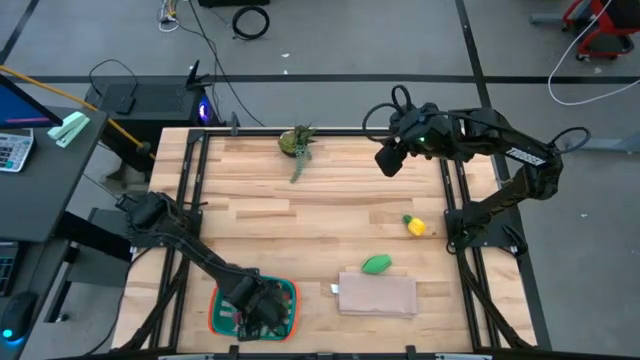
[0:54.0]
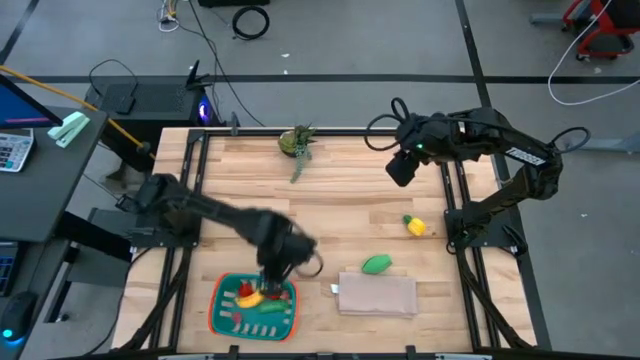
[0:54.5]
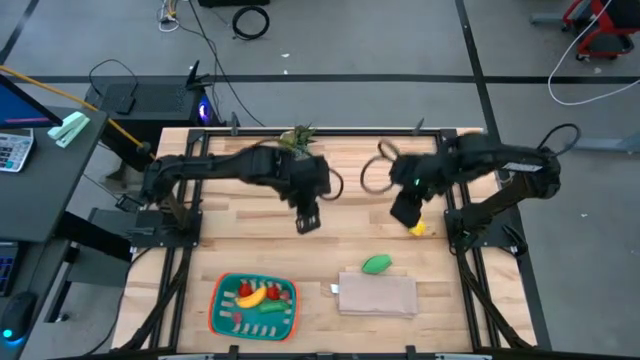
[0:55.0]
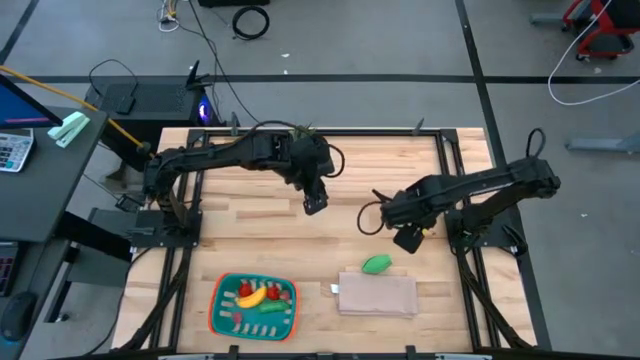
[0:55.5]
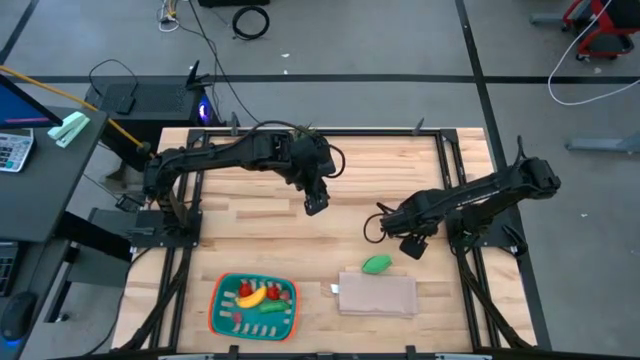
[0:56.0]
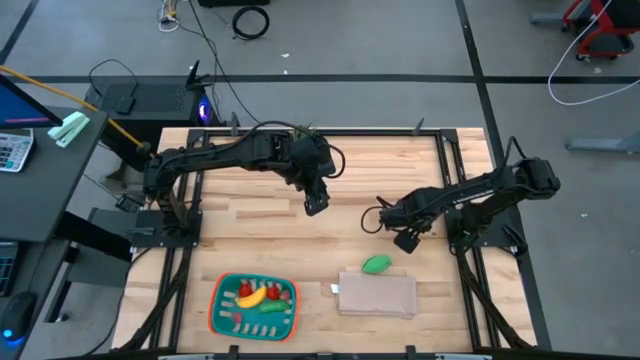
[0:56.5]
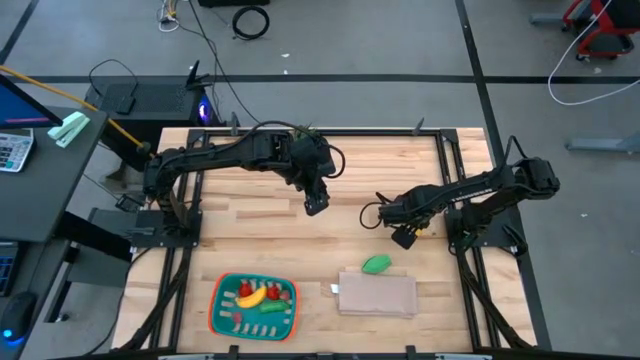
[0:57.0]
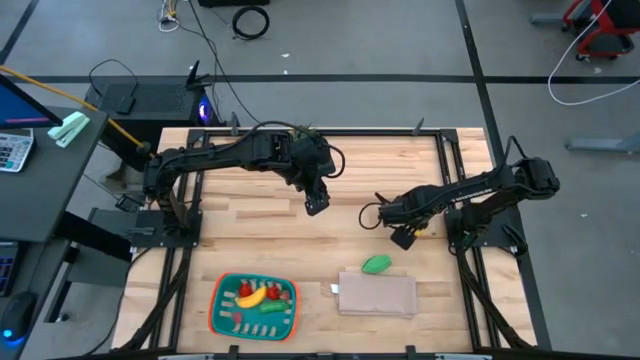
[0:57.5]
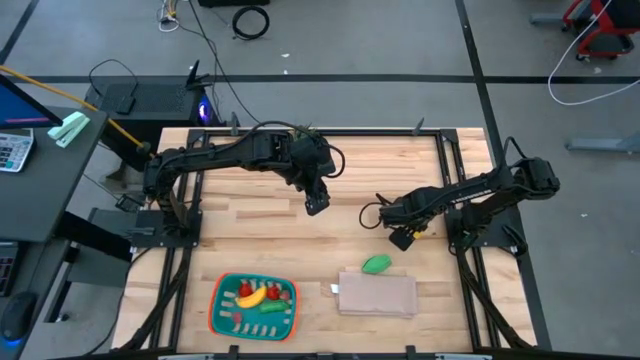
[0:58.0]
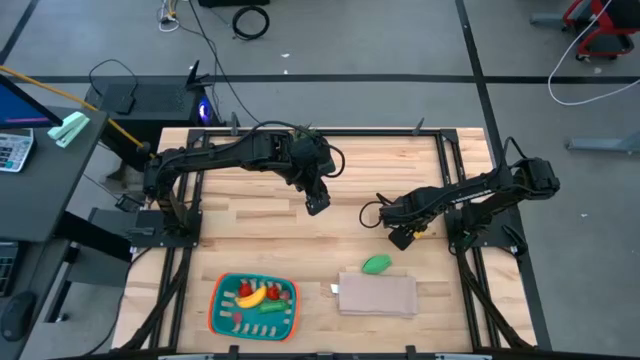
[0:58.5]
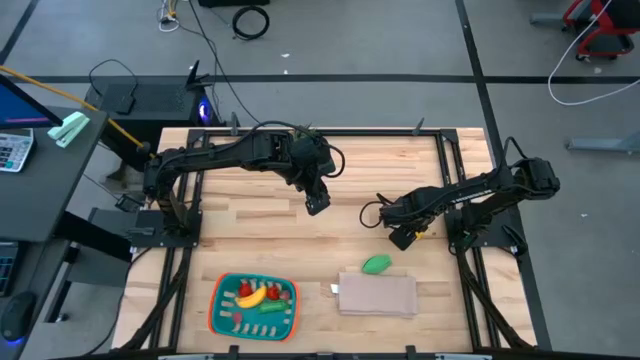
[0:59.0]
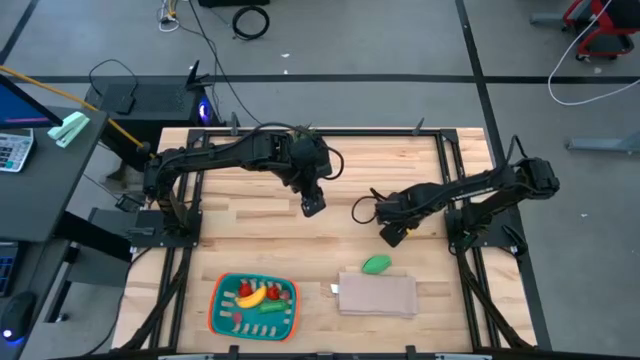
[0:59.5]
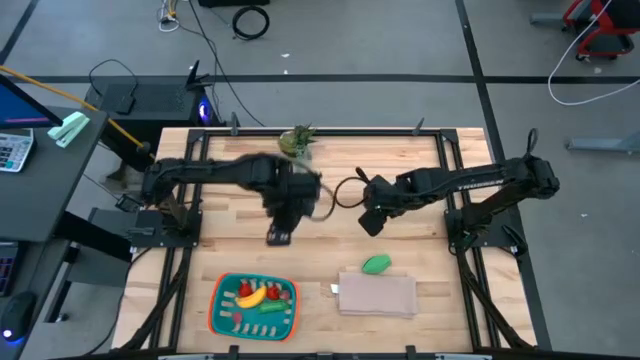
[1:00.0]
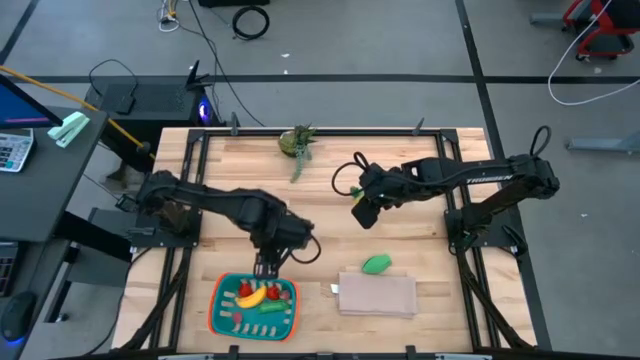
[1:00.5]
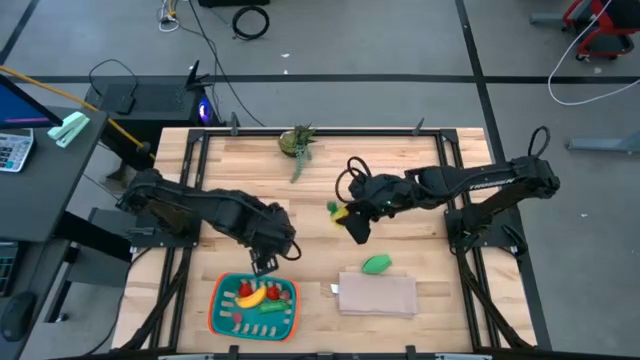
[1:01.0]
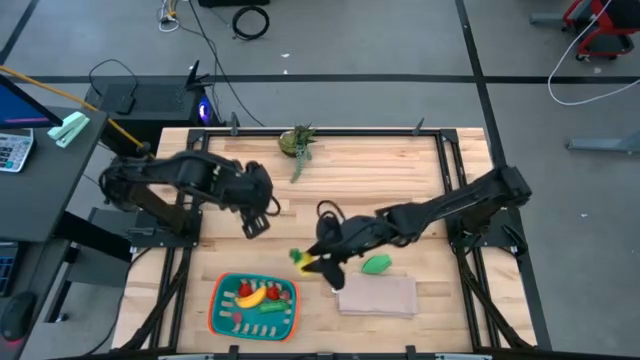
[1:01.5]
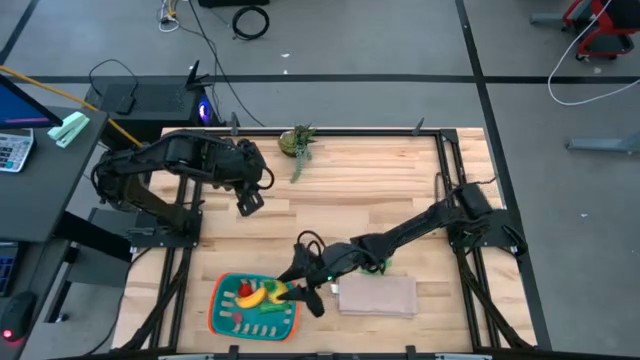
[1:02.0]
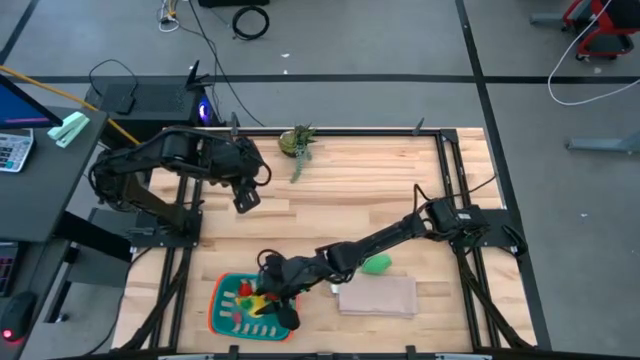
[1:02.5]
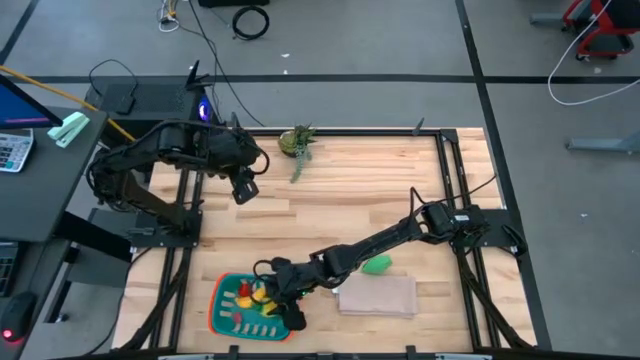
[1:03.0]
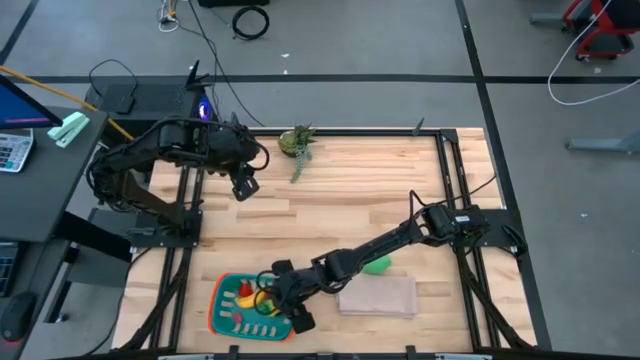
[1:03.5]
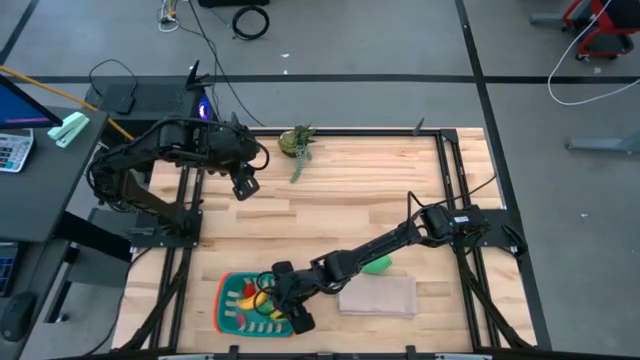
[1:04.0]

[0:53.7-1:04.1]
Task: Pick and placing Produce into tupperware
Put the yellow pineapple into the blue basket

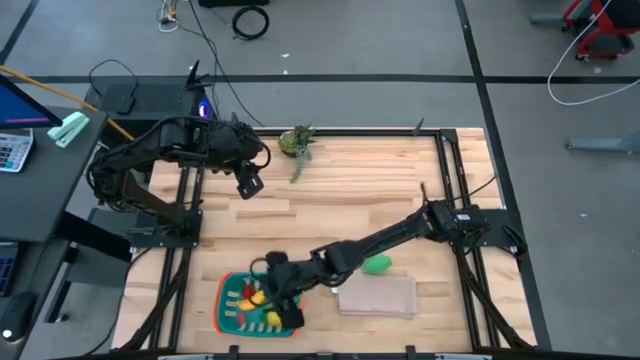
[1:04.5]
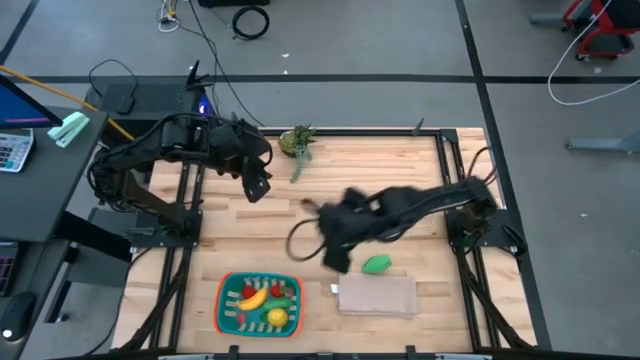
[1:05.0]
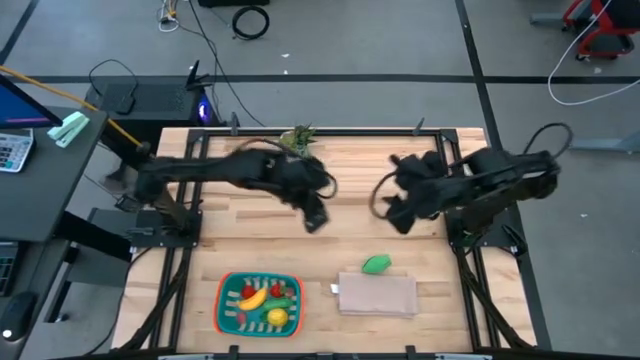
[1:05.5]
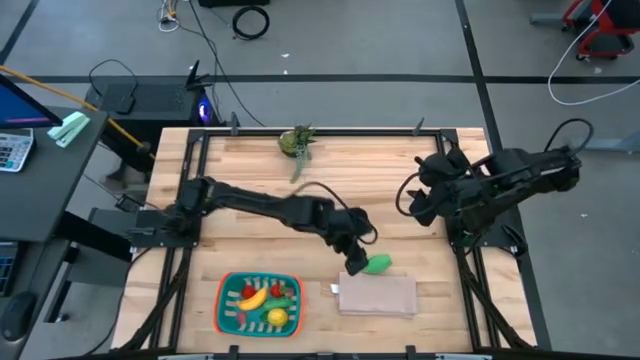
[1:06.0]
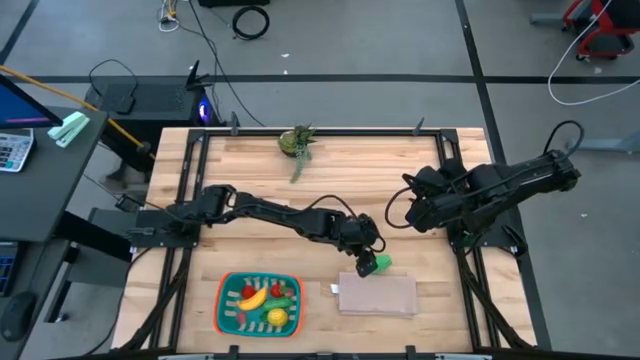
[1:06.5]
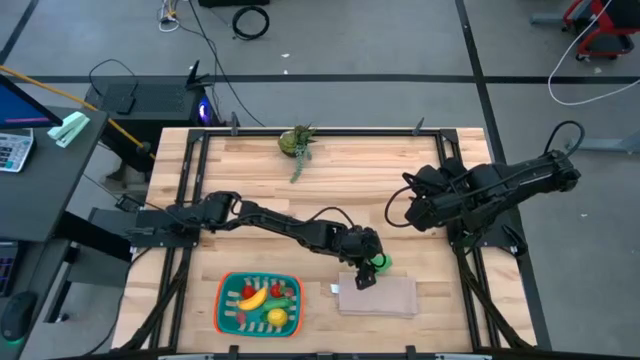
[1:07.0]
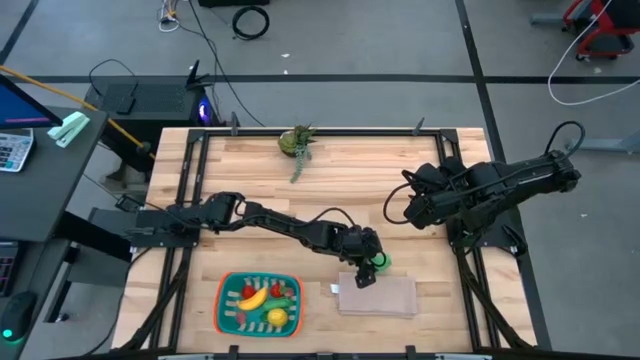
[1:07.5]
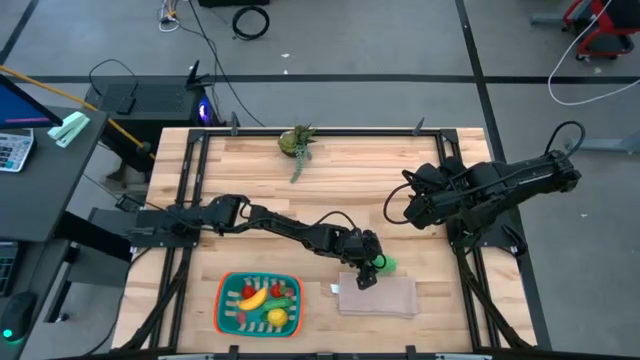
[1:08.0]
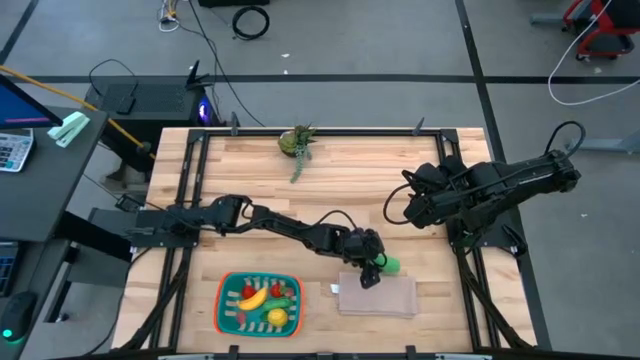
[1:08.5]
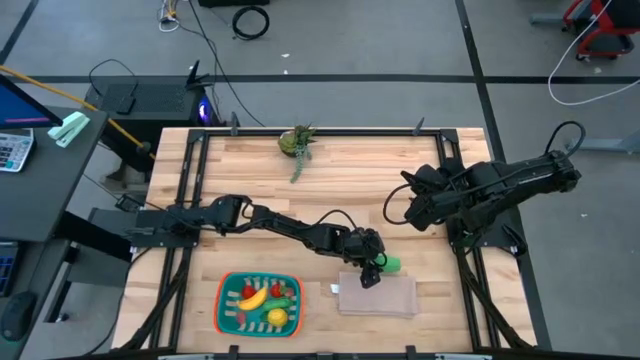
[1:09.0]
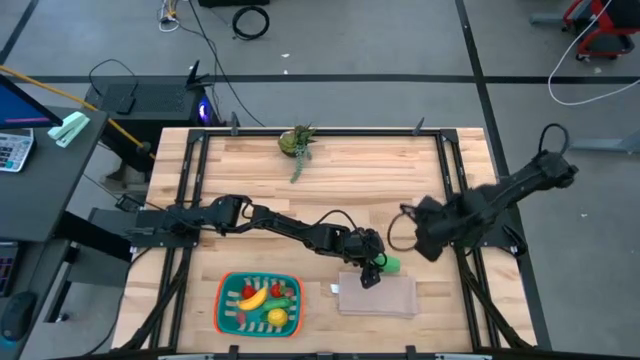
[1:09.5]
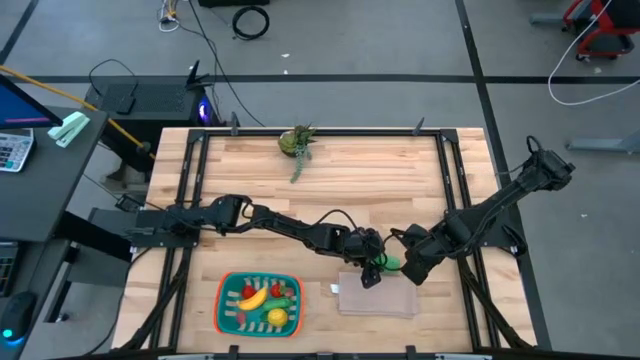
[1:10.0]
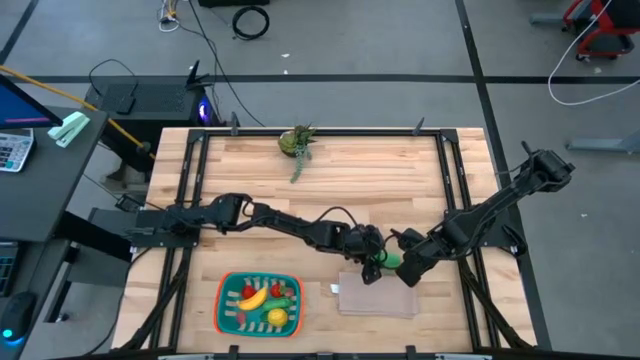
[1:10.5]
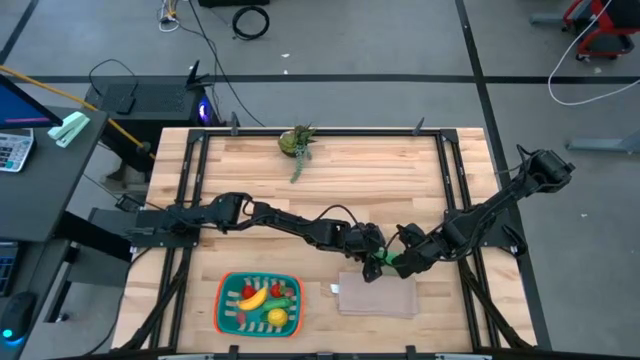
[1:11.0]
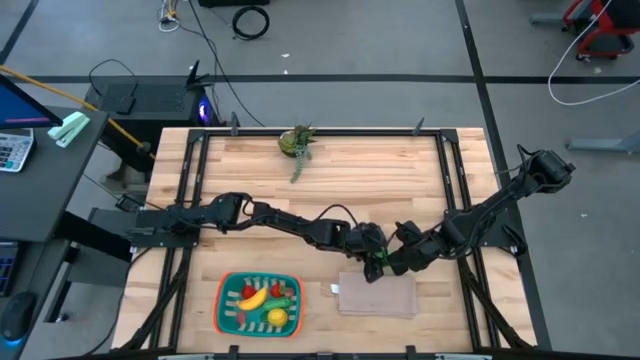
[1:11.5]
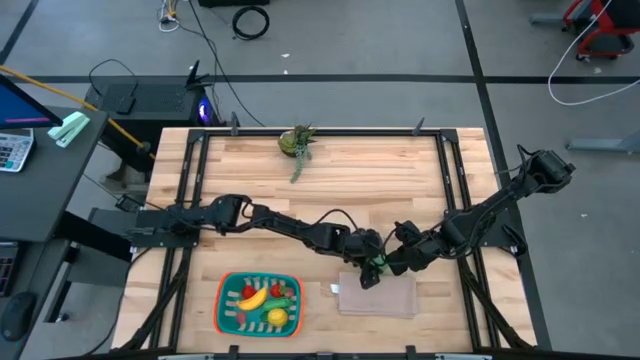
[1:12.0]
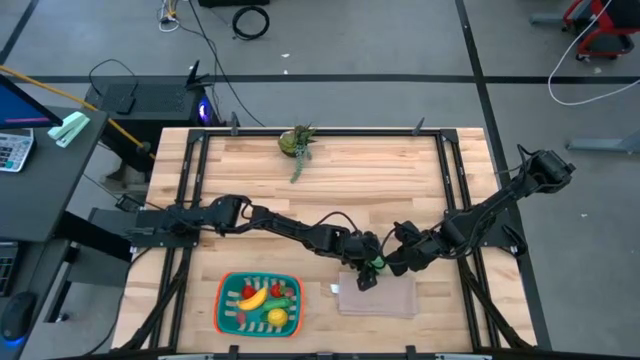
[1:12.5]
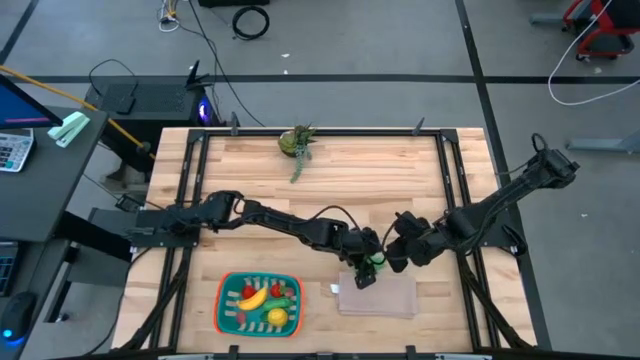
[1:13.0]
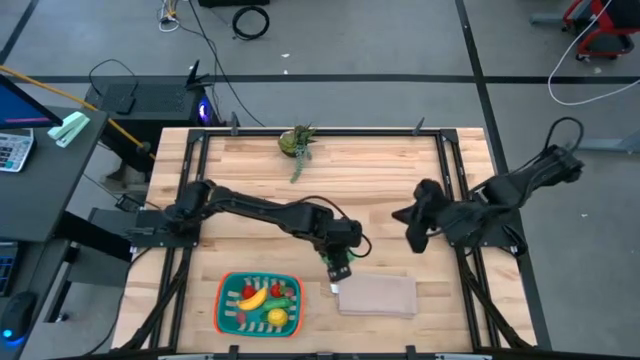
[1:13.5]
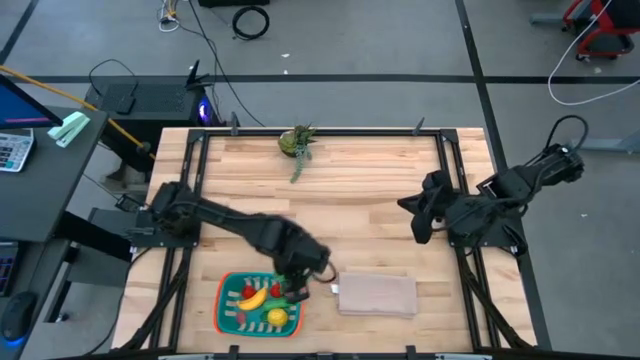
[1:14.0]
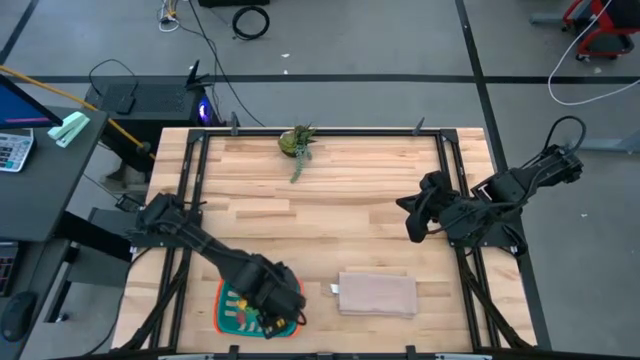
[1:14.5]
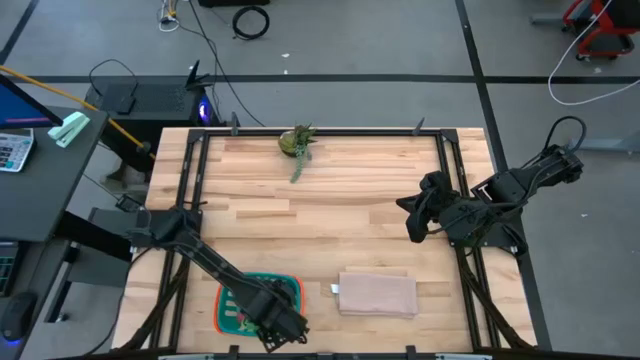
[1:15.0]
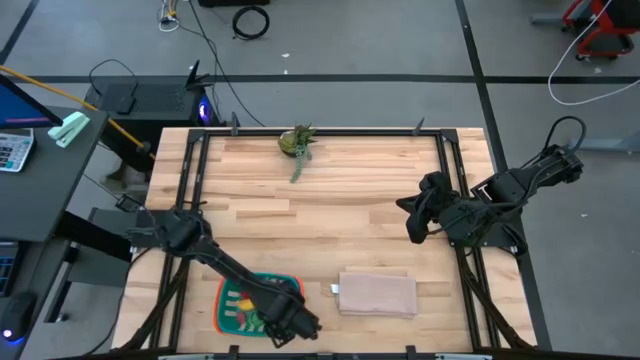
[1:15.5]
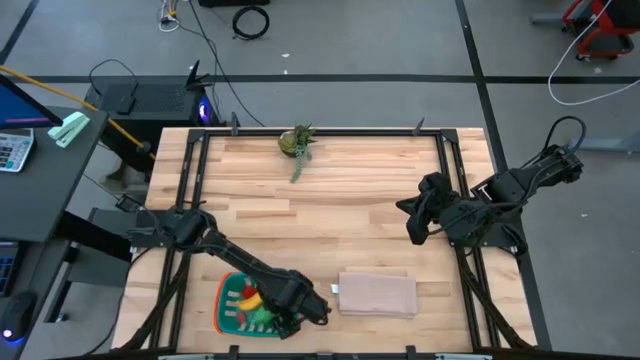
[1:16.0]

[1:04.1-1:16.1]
Put the green corn into the blue basket
